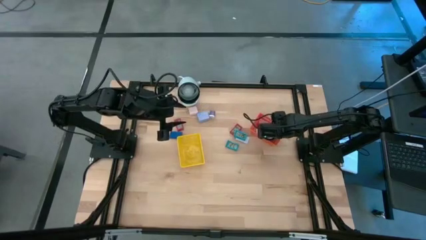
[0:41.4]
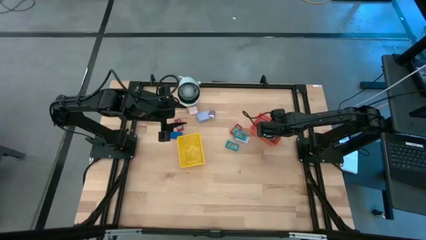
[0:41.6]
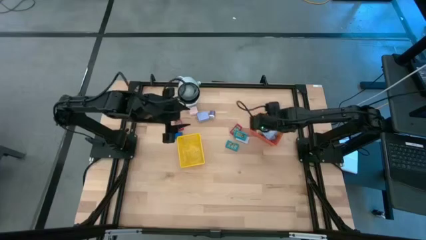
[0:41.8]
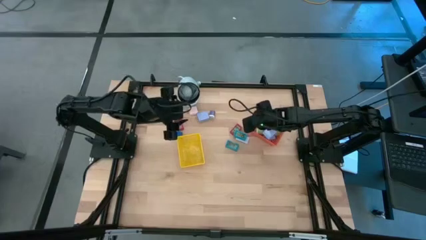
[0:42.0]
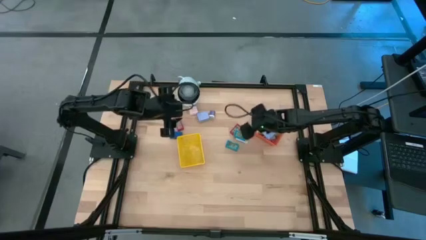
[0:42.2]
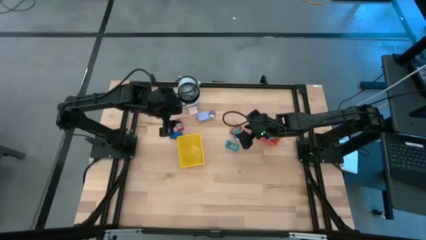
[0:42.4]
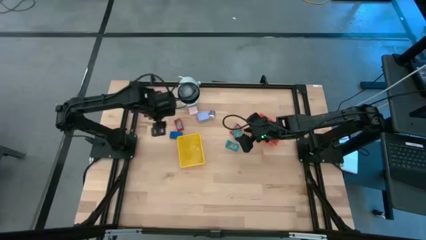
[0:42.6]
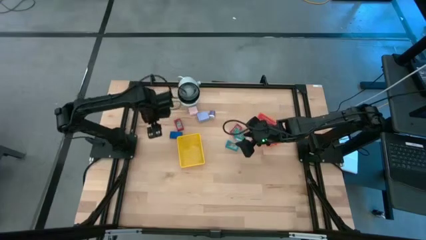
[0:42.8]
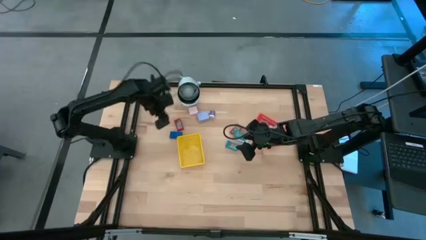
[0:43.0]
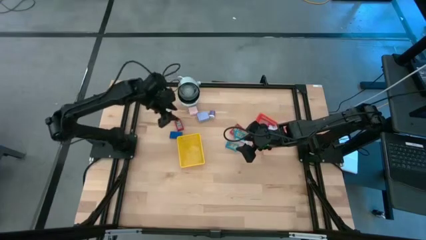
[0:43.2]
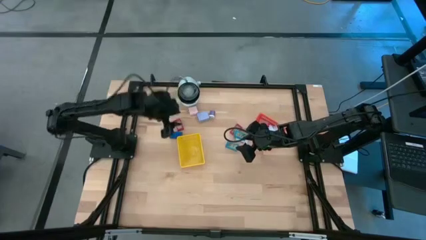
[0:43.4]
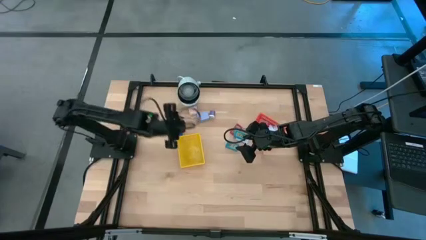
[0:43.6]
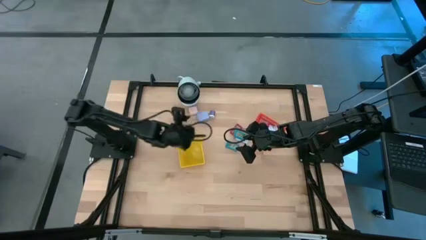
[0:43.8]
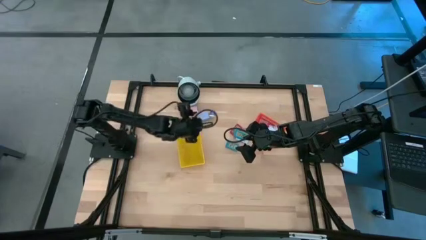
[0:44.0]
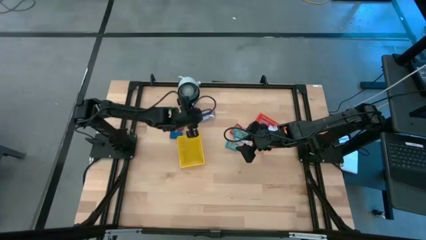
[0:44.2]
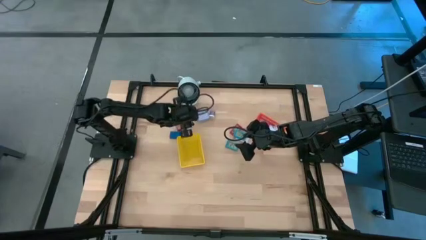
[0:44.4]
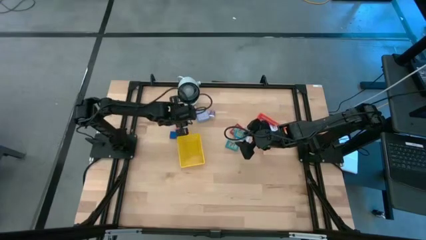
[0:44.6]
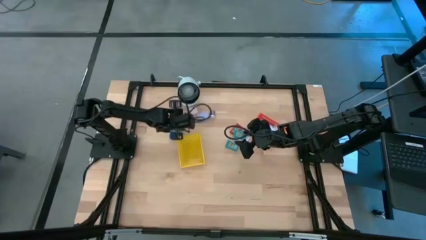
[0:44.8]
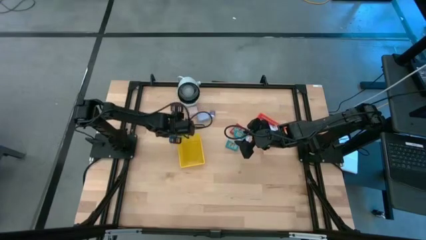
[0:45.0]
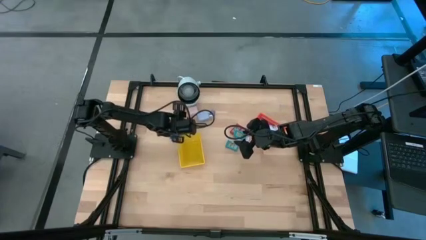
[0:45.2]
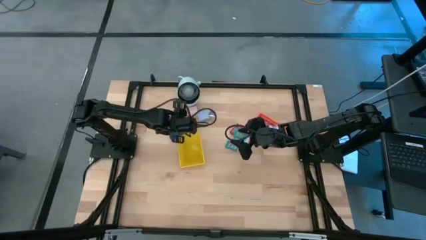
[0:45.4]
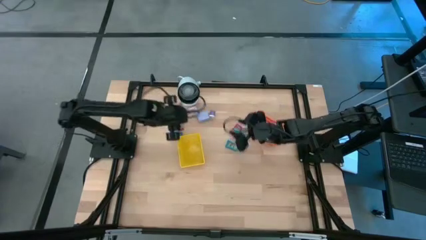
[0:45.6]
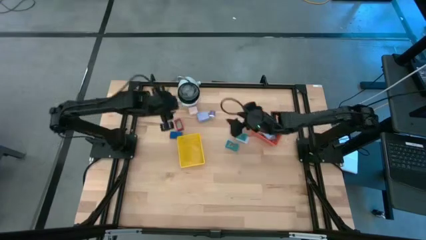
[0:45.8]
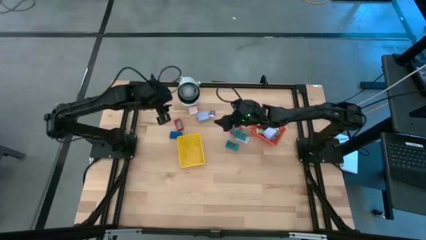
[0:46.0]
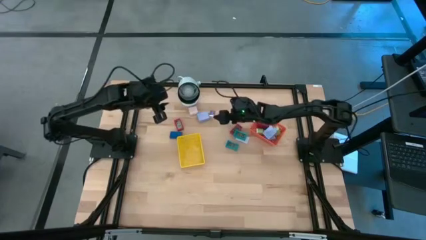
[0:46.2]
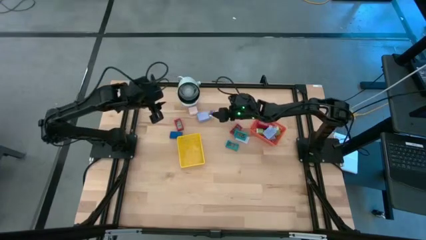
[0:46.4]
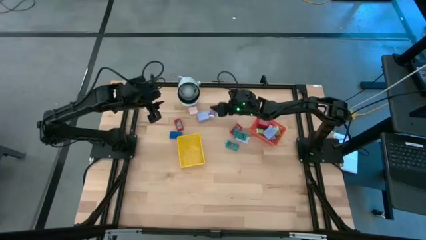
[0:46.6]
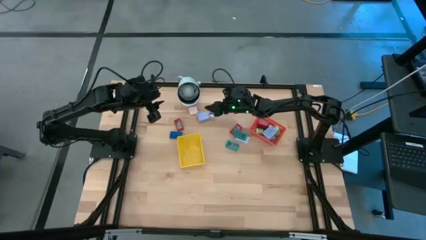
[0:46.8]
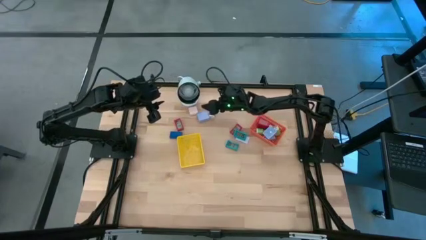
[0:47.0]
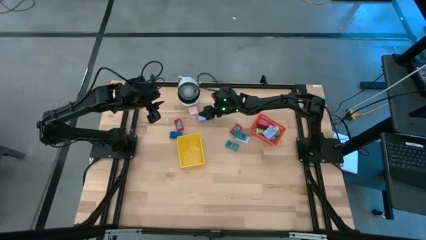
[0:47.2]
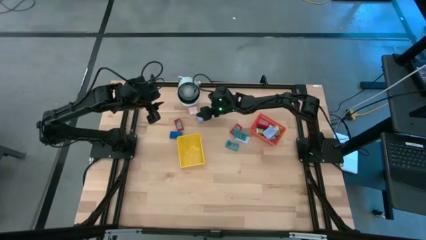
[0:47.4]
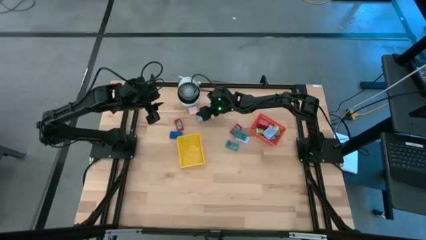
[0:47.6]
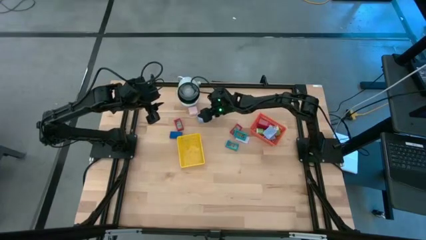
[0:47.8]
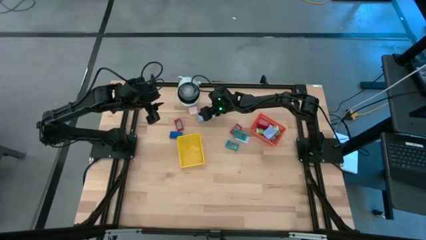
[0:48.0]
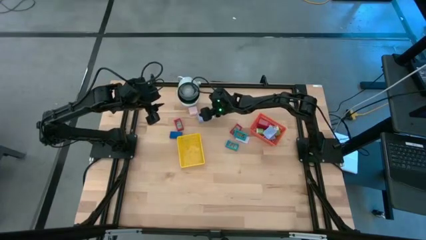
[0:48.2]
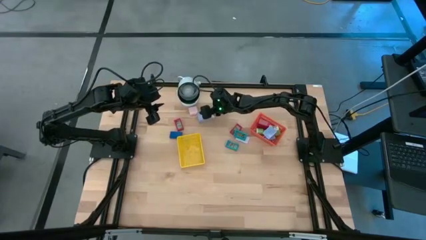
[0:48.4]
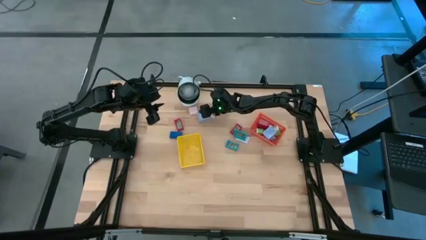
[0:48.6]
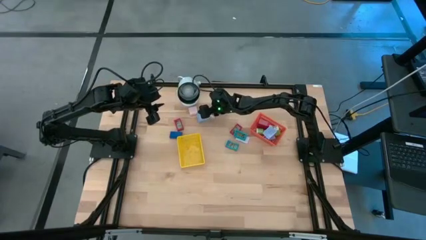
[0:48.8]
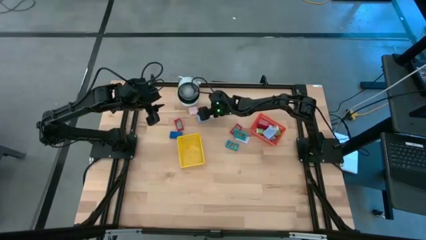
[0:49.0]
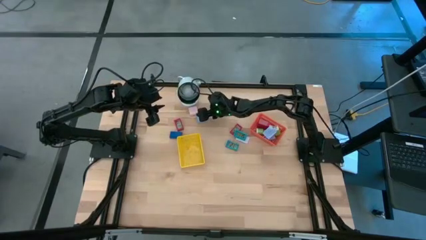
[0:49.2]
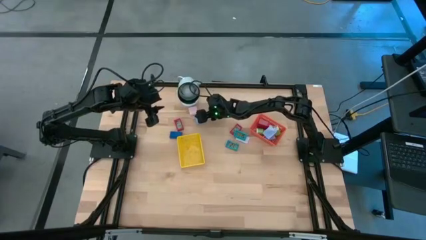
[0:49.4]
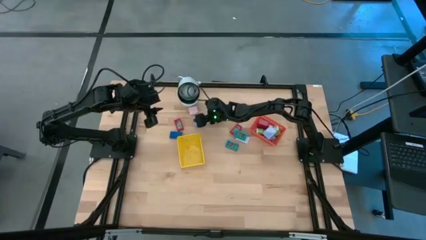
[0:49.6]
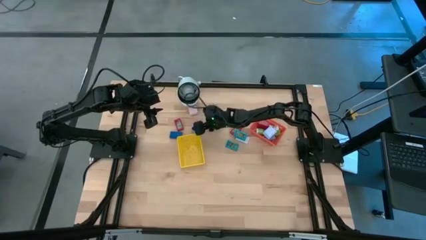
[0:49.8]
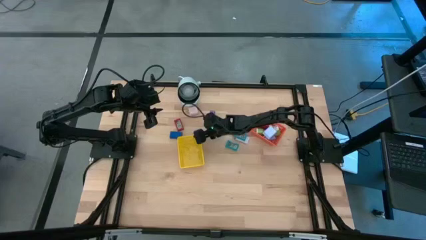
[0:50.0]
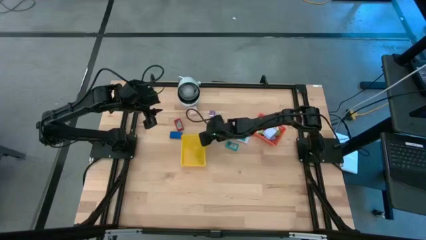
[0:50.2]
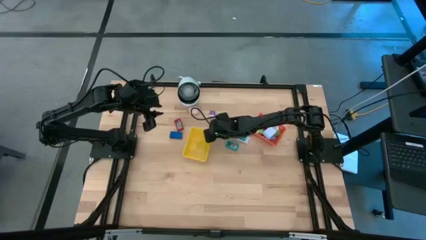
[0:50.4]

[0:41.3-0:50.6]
Task: Pick & Place Office items
Put the blue charger adapter into the orange basket

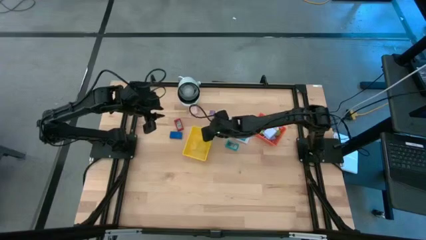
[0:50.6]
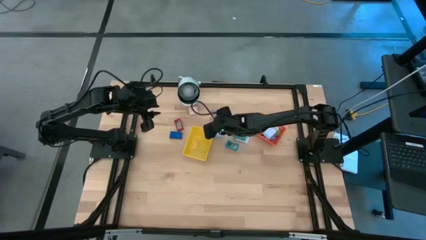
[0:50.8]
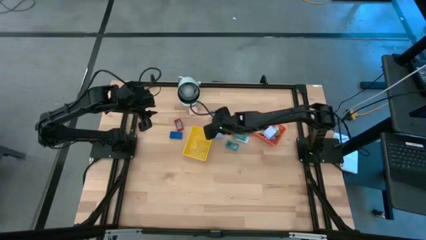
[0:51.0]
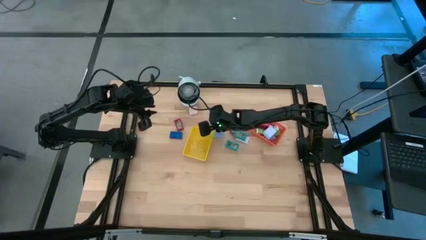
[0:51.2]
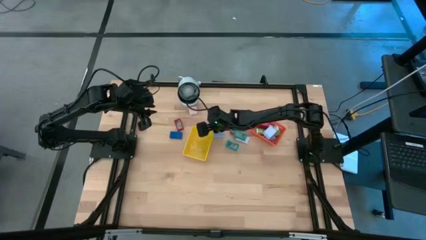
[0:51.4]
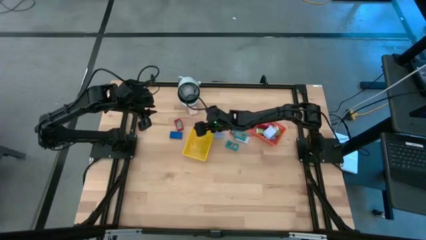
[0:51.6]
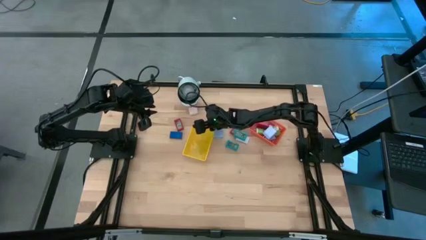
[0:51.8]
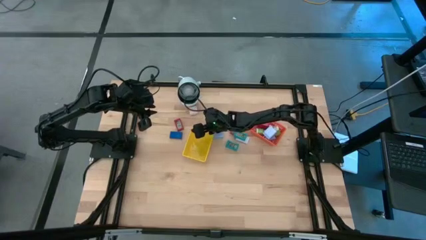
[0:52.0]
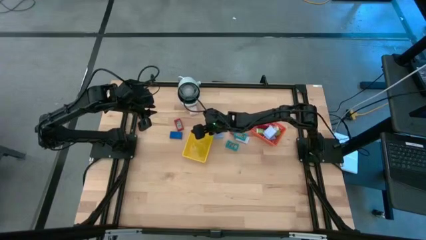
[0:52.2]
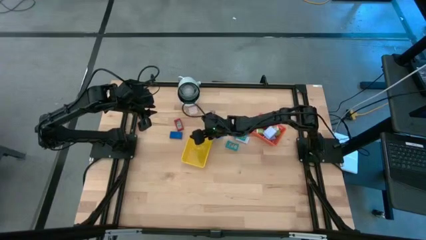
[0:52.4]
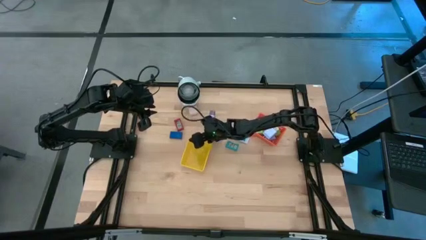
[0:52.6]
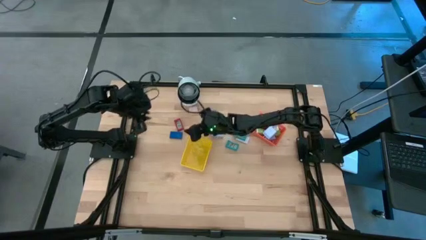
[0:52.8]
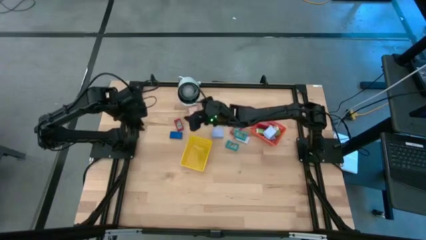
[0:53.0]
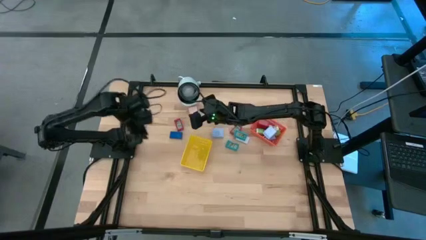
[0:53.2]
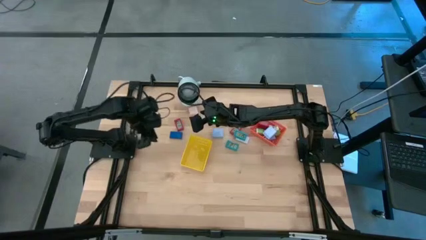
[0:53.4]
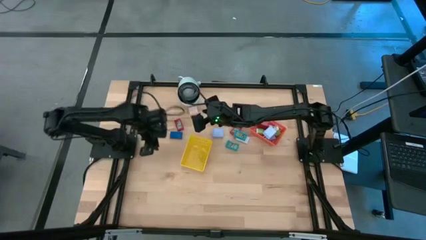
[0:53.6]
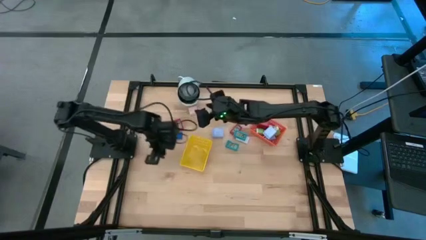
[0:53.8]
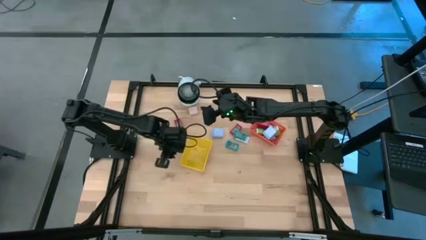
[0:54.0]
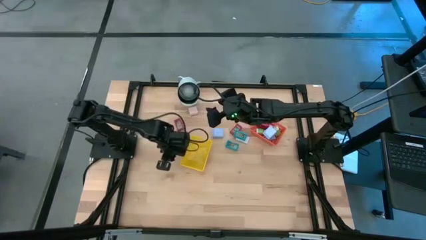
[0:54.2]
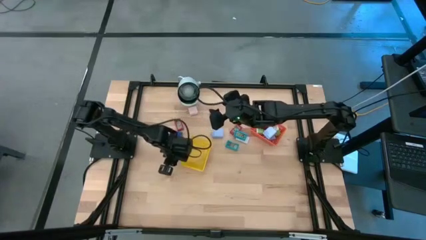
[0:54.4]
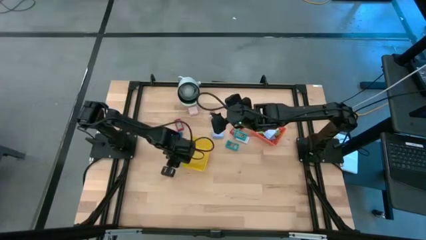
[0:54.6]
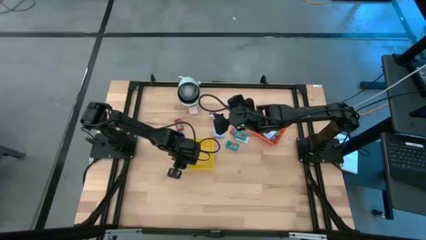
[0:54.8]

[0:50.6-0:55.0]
Adjust the yellow basket

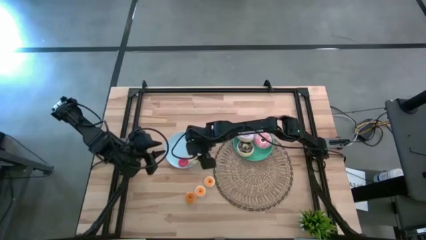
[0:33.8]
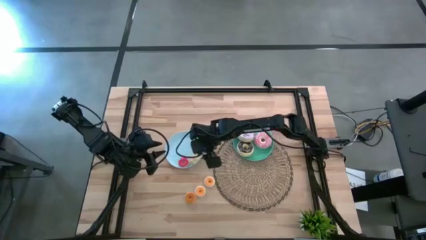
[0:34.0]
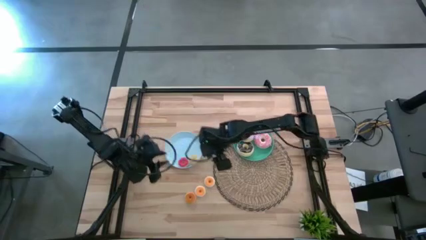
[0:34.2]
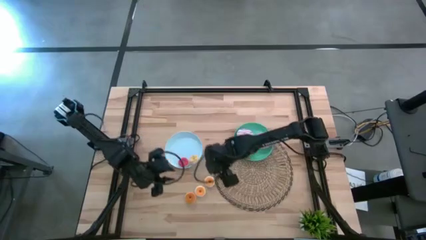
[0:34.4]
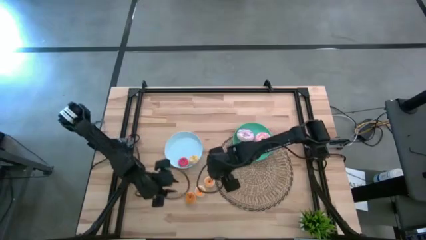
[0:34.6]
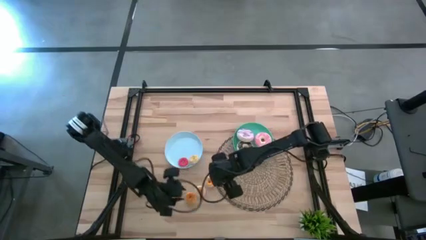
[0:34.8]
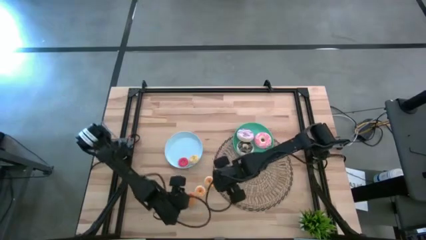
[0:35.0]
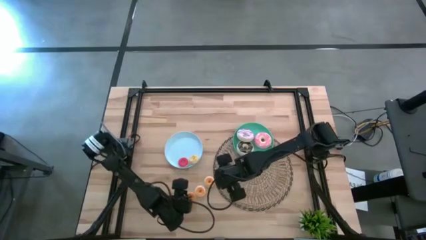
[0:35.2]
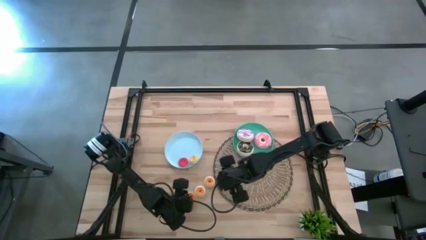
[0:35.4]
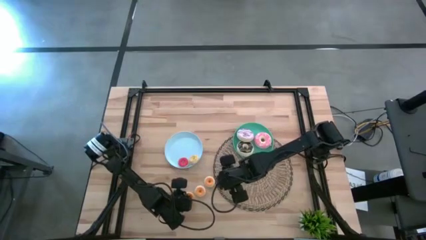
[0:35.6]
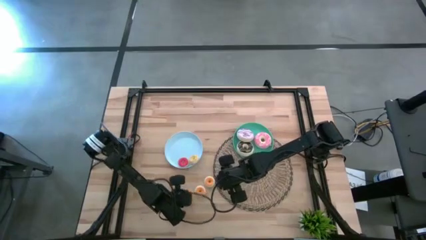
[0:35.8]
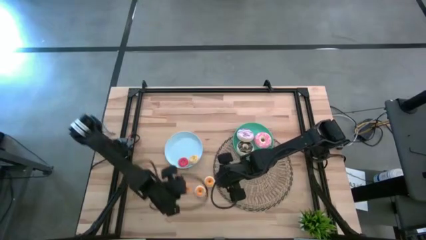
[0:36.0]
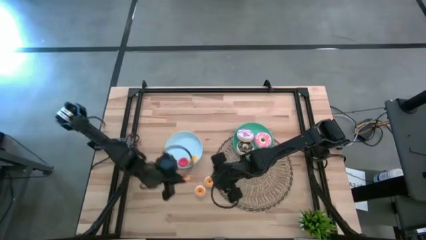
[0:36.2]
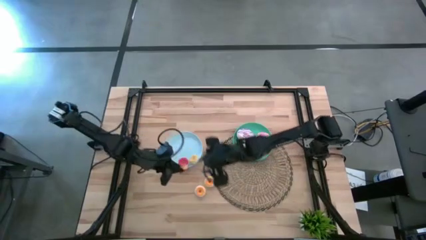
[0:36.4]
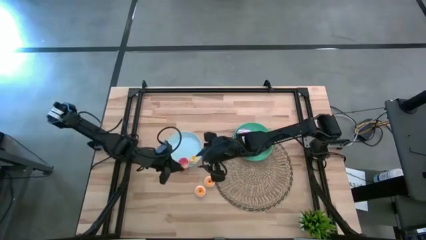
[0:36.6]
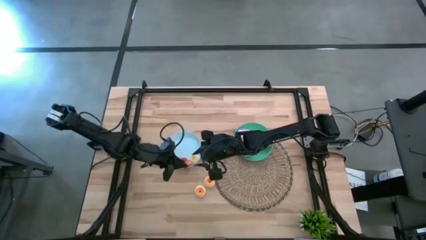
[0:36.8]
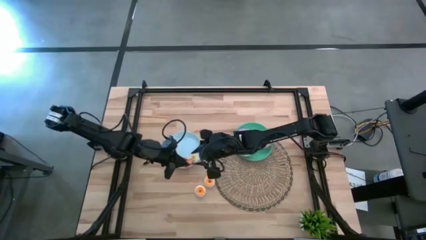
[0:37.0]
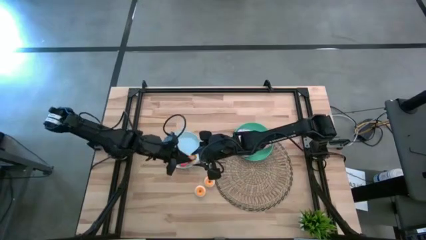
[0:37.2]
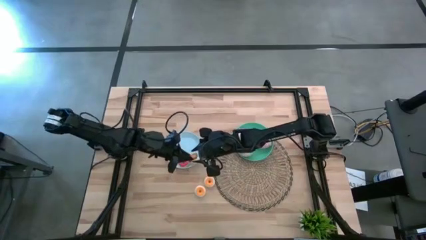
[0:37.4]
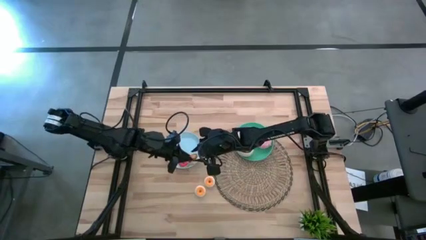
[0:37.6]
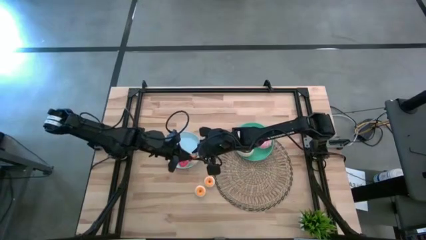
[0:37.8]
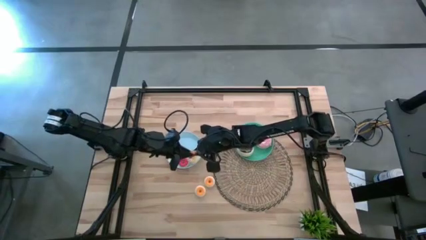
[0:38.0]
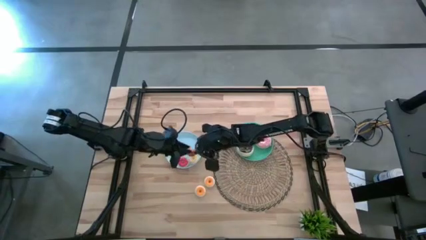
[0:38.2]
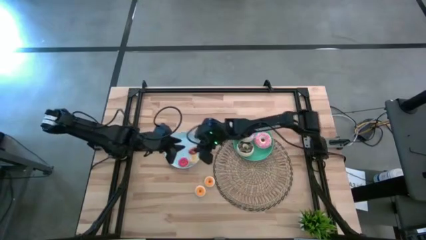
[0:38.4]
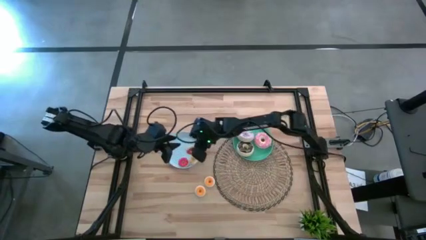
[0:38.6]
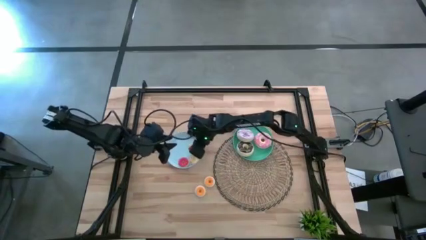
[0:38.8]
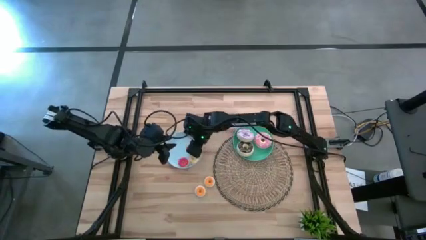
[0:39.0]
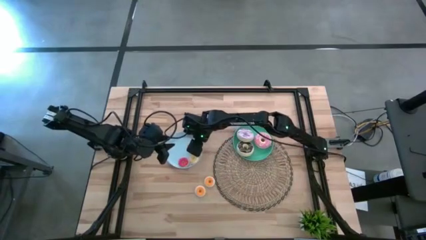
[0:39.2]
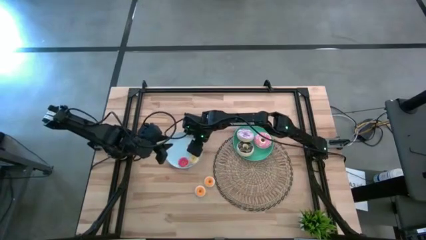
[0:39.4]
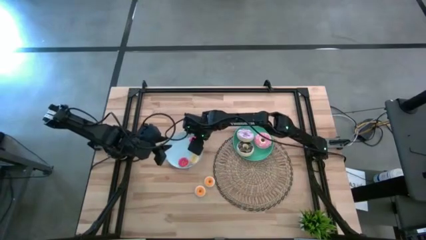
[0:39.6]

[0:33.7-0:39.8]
Task: Pick & Place donuts
Put the orange doughnut on the blue plate
